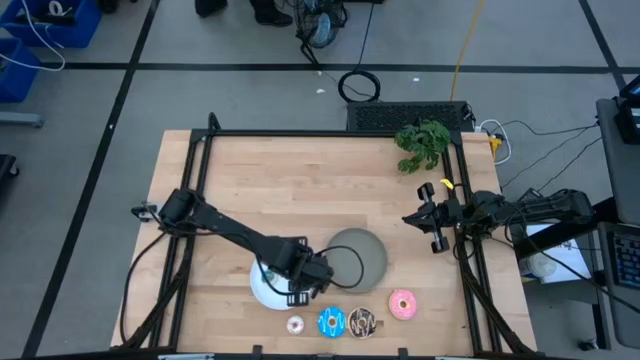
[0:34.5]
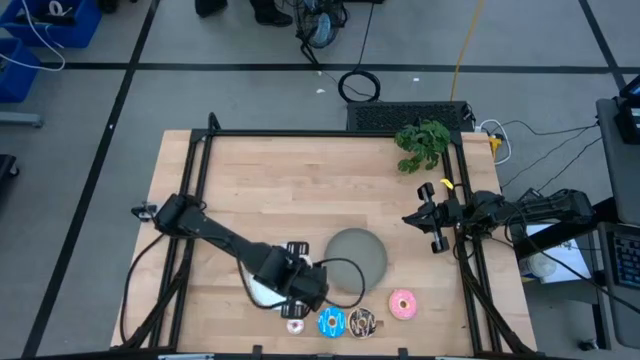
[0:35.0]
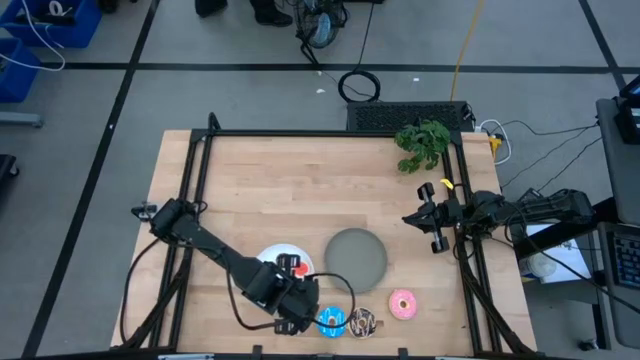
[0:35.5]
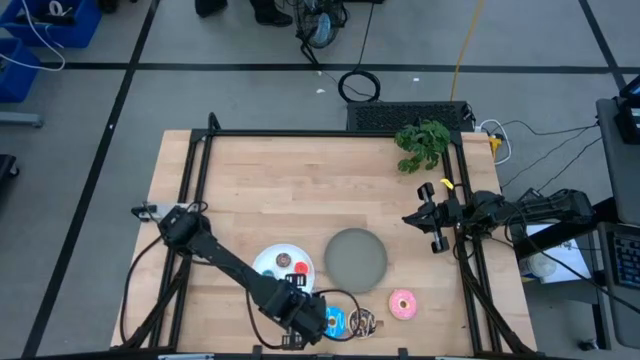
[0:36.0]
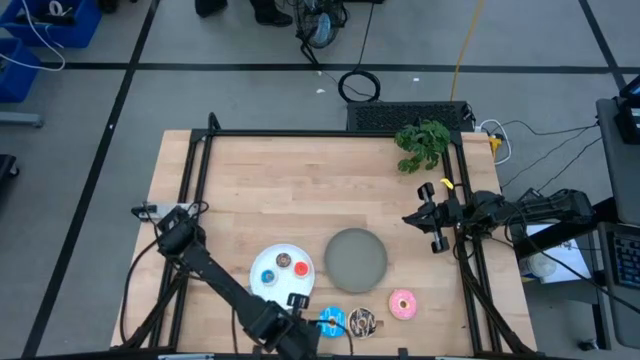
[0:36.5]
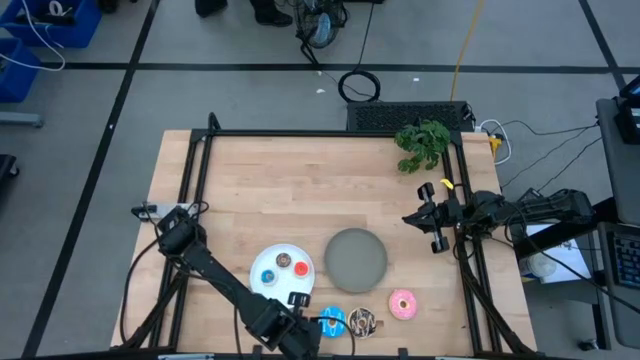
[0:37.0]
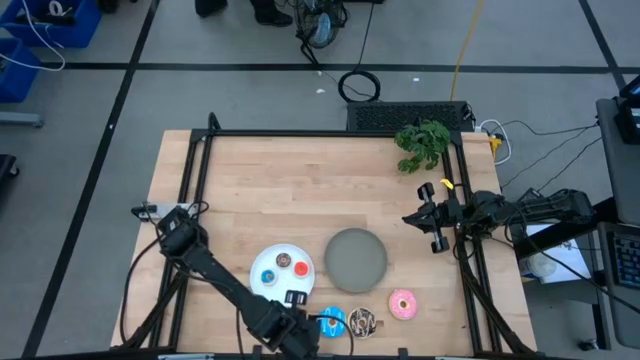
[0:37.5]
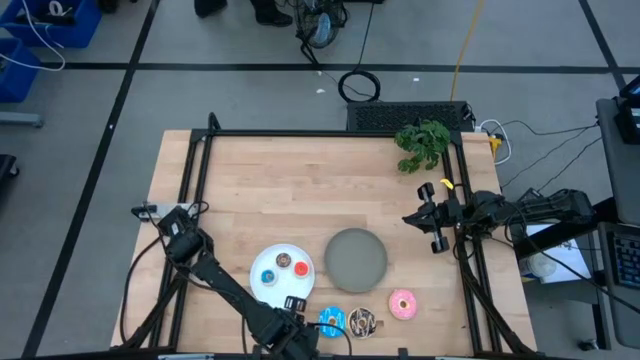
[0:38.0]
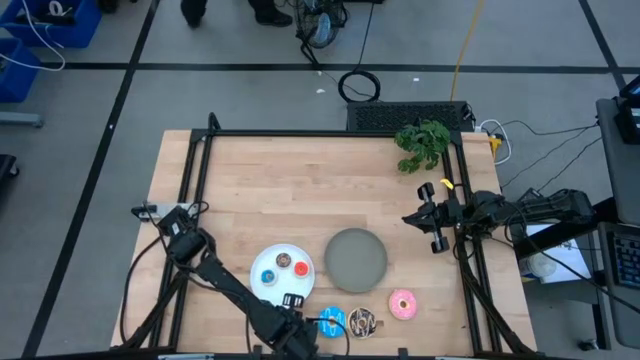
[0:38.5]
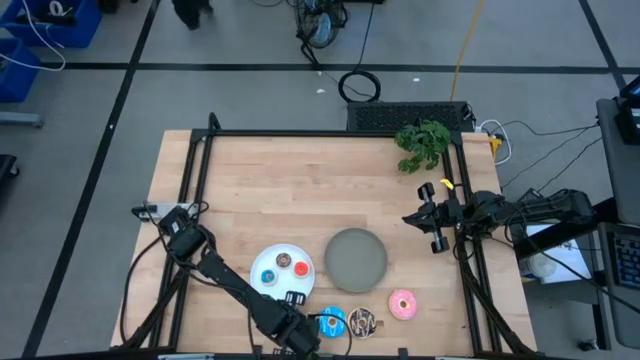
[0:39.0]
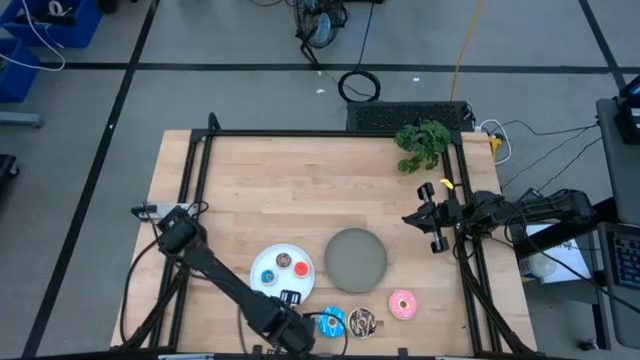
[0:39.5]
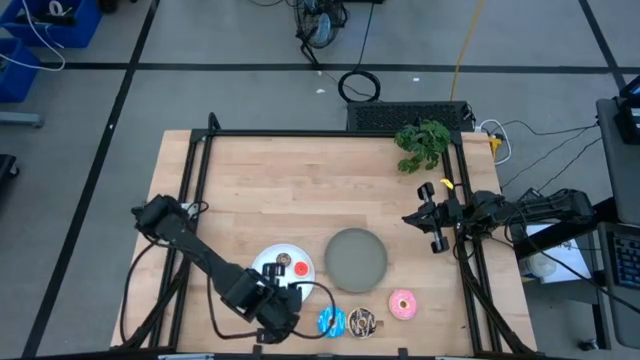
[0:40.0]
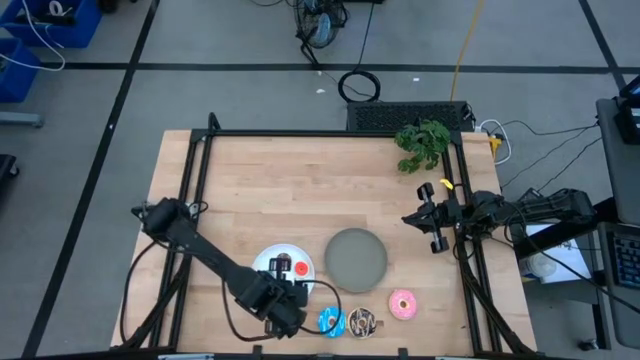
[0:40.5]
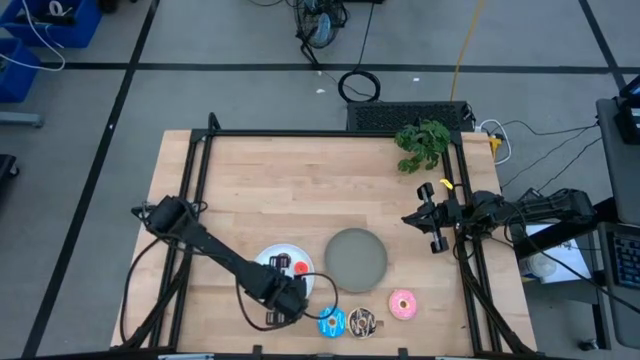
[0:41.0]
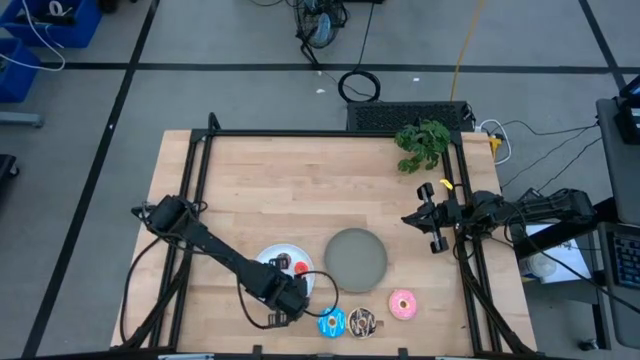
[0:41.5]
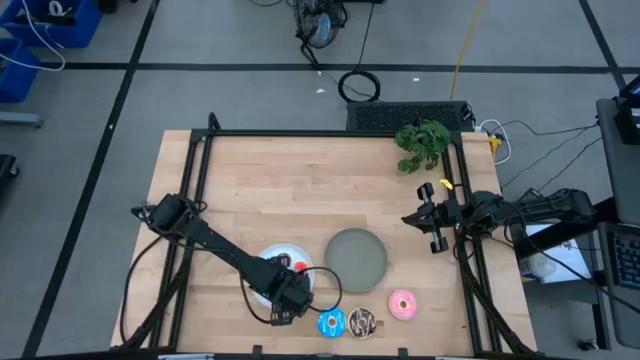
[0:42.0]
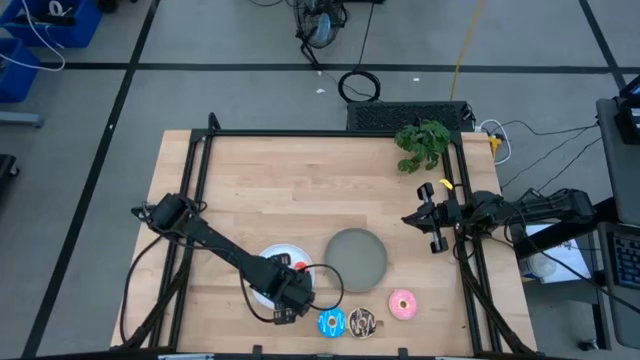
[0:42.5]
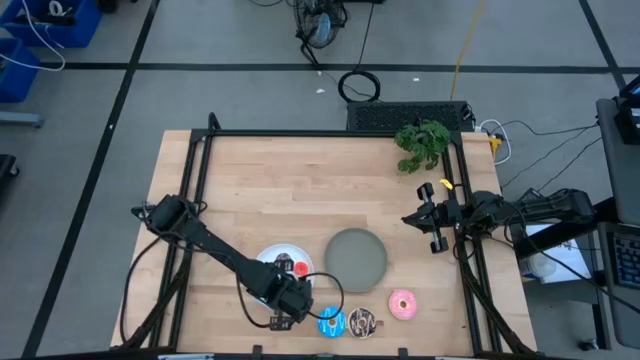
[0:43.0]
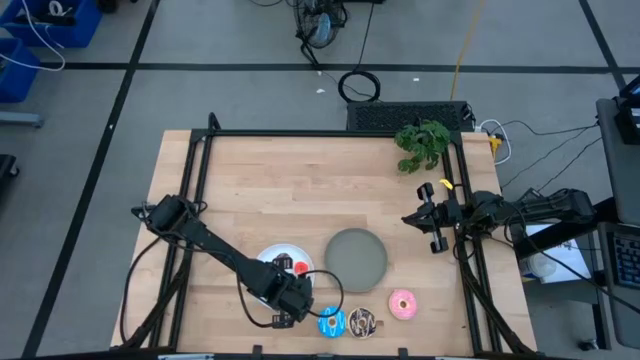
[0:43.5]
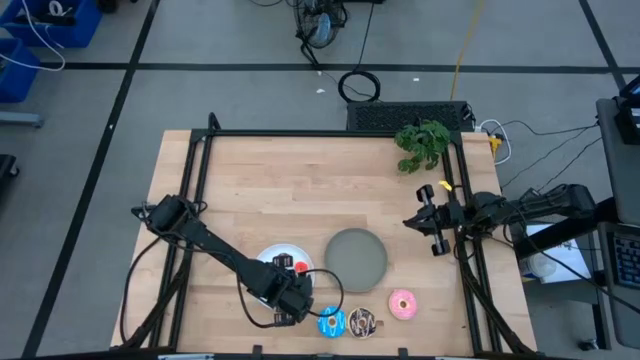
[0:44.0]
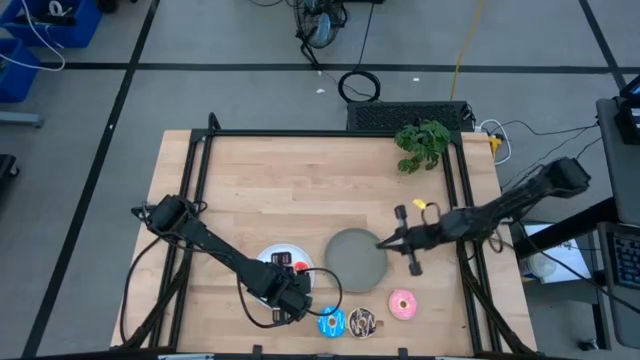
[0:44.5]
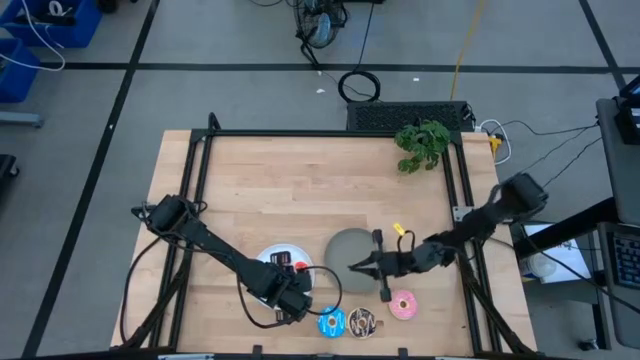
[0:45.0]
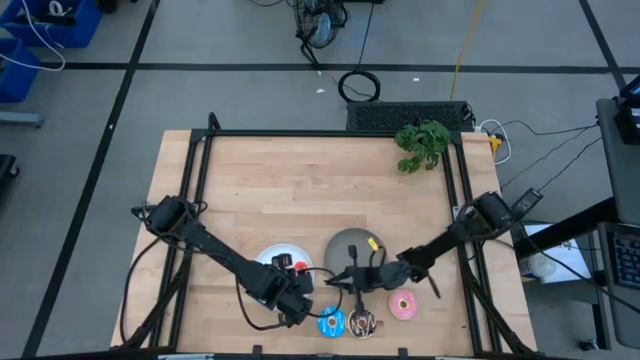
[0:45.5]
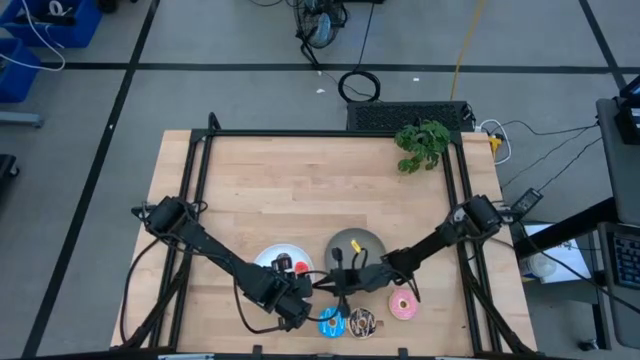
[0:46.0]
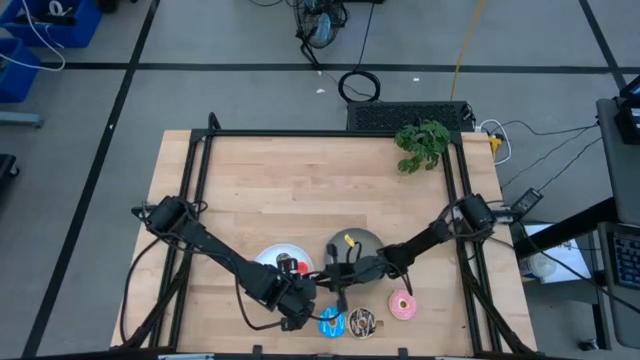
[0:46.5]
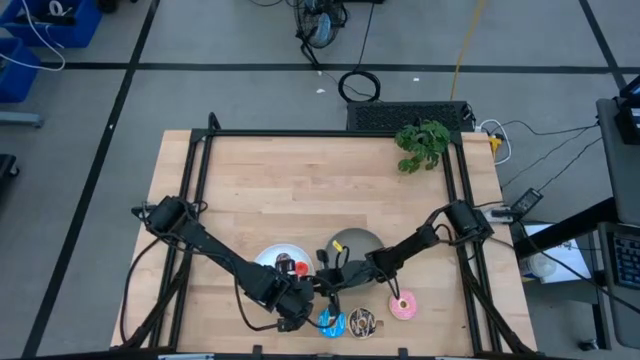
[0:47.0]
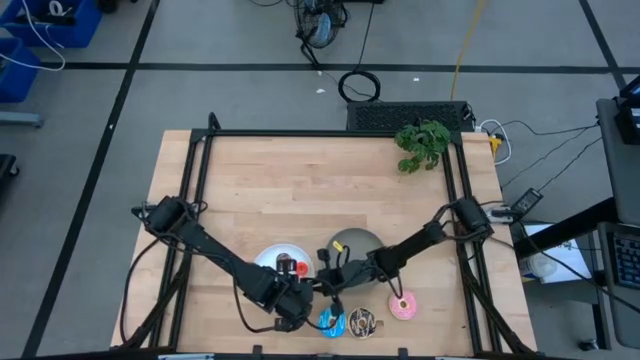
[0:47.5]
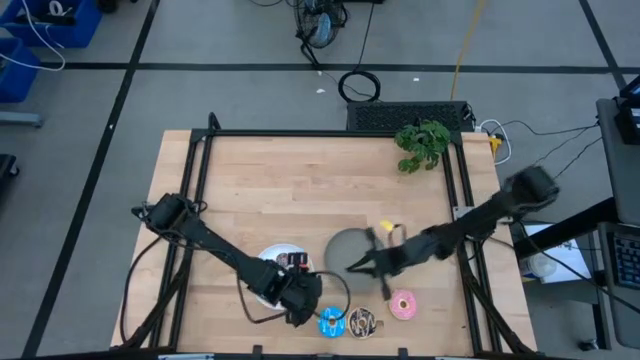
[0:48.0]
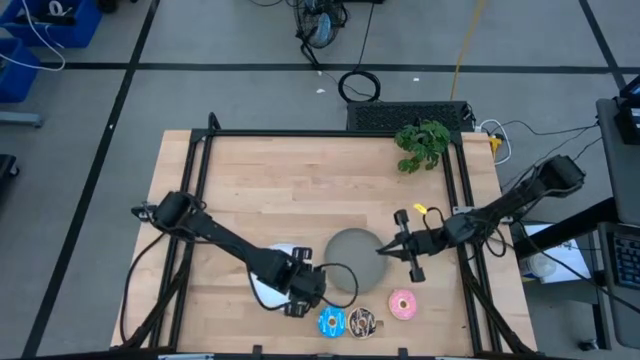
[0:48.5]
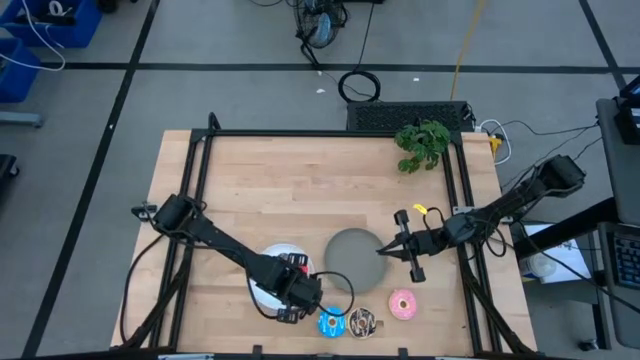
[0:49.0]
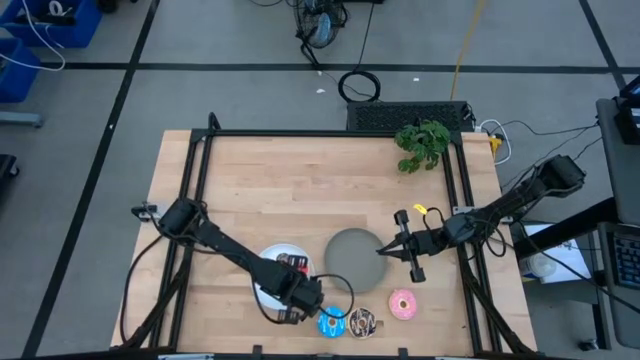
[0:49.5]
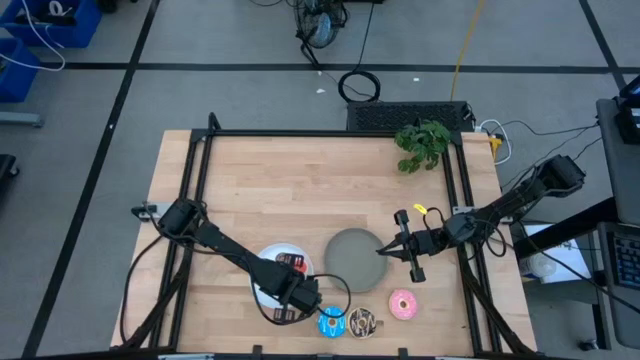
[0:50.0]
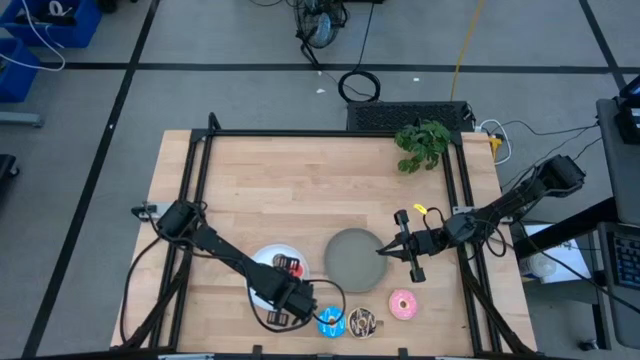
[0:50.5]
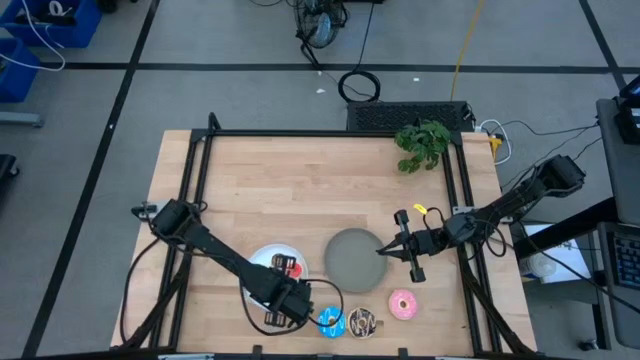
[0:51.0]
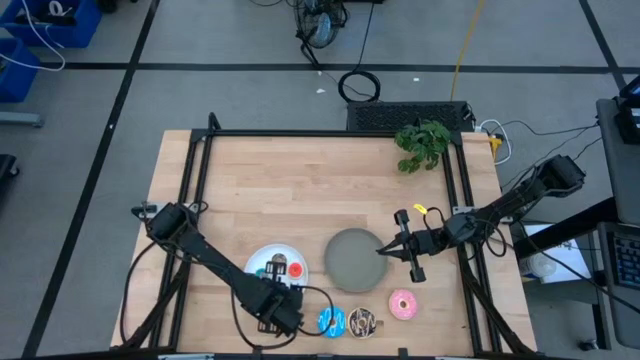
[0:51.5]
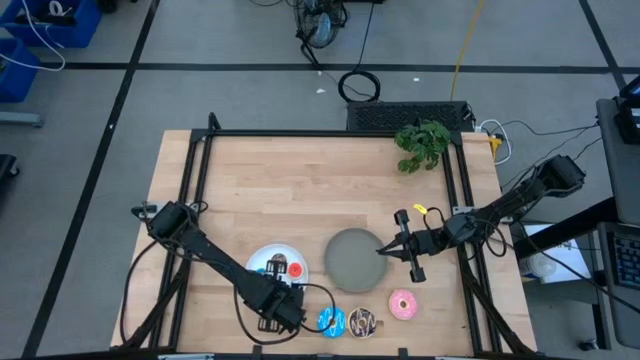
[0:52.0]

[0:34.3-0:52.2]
Task: Pick & Place donuts
Put the small white donut on the white plate

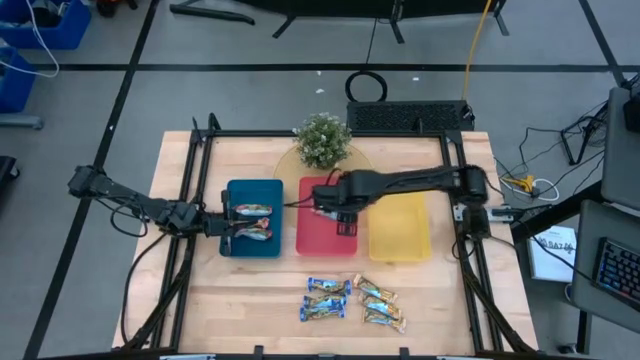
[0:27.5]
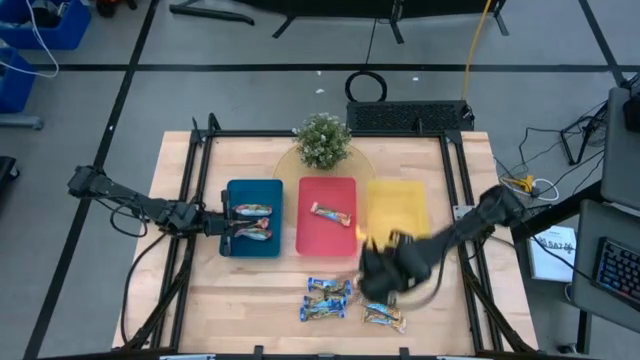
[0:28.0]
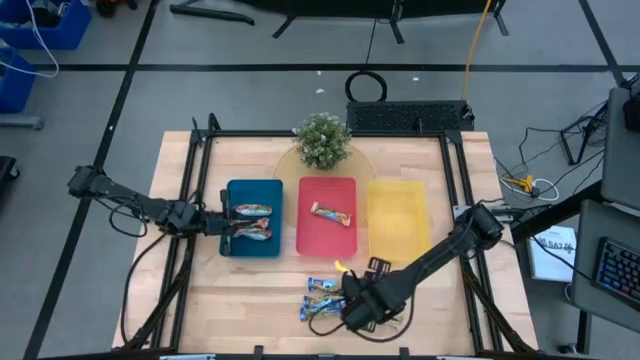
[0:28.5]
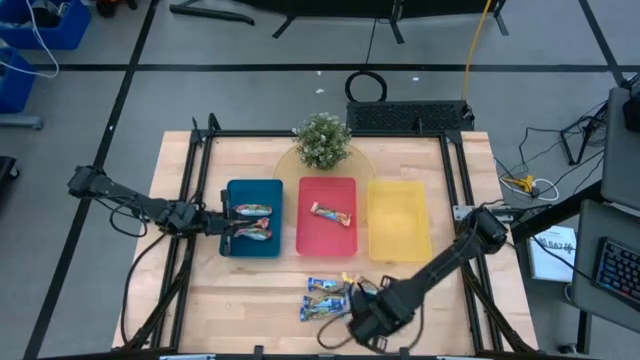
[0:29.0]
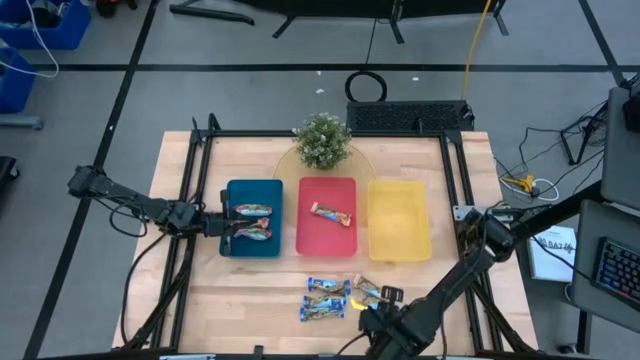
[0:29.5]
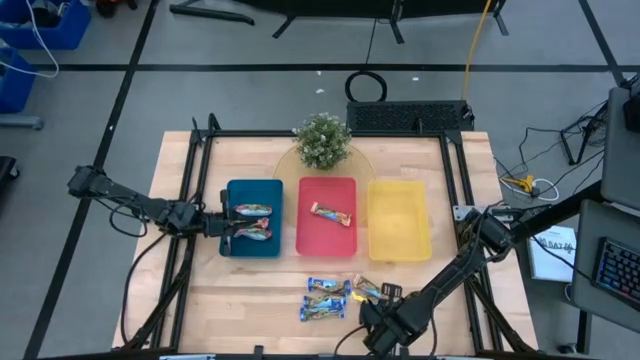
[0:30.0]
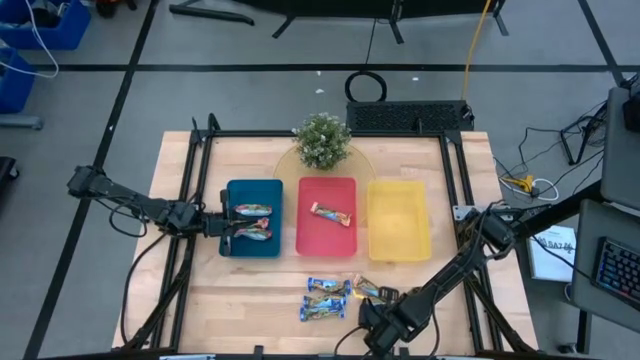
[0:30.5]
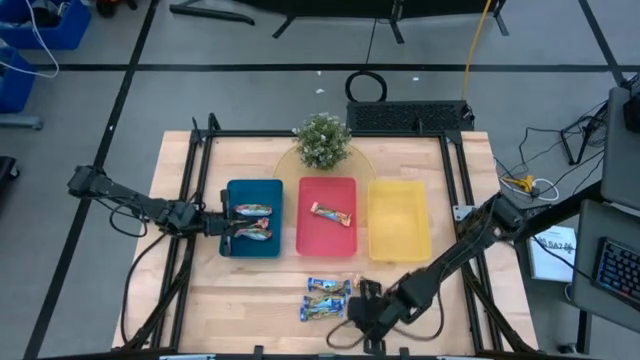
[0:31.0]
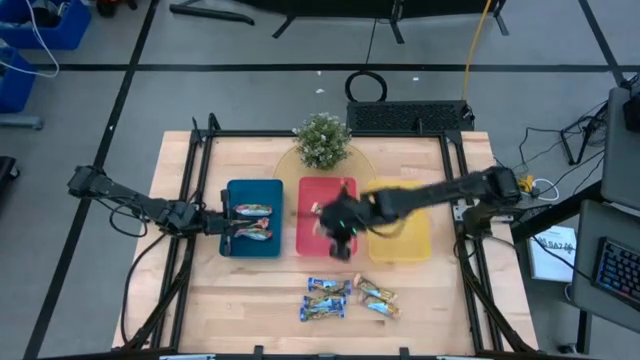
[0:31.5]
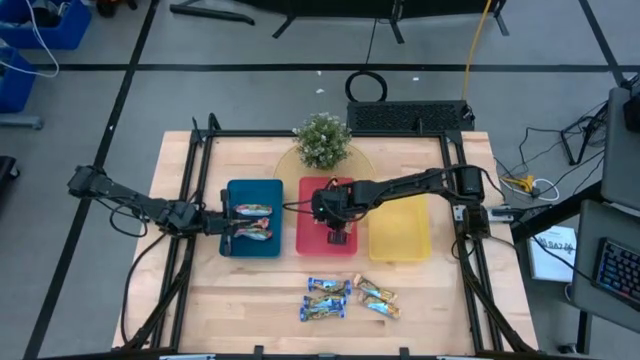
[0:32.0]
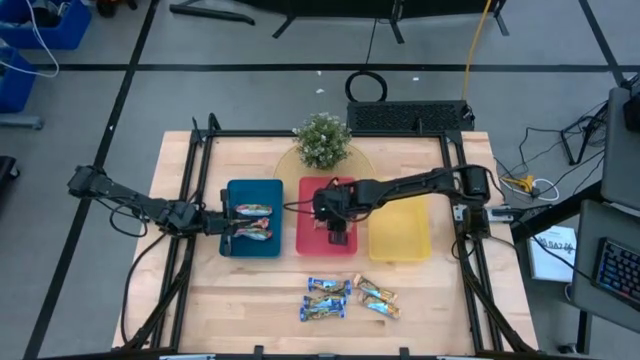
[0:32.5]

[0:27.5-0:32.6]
Task: Pick and place Granola Bars by type
Put the bottom yellow granola bar into the red bin
